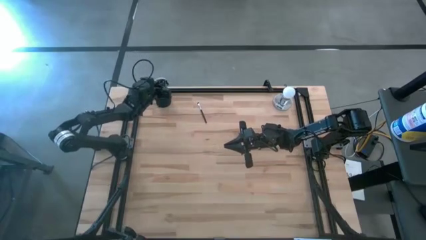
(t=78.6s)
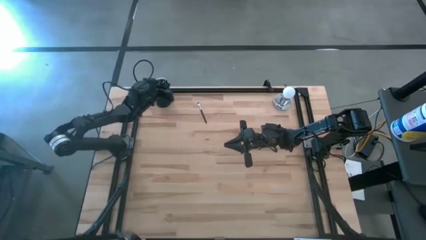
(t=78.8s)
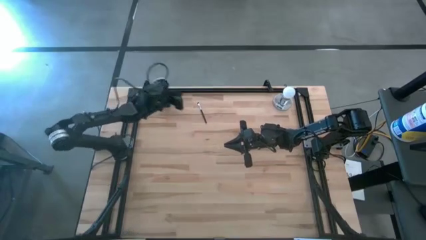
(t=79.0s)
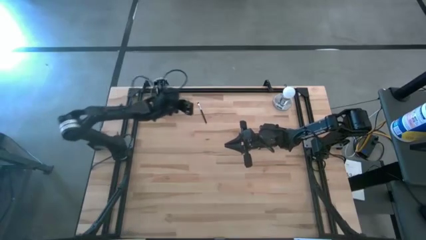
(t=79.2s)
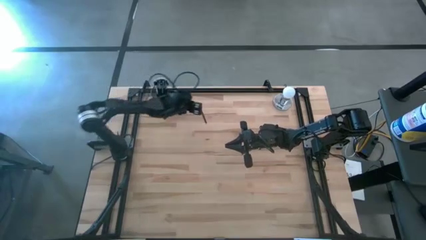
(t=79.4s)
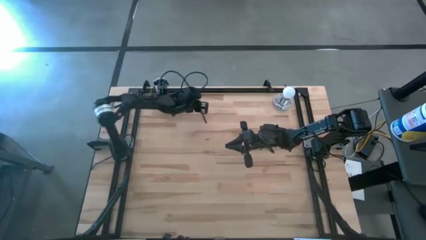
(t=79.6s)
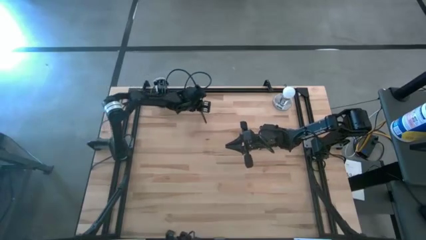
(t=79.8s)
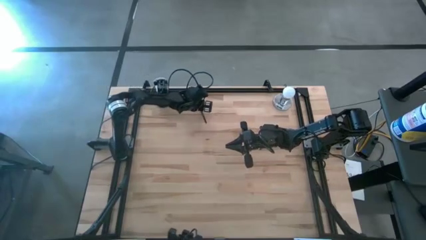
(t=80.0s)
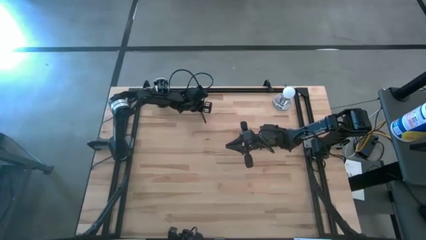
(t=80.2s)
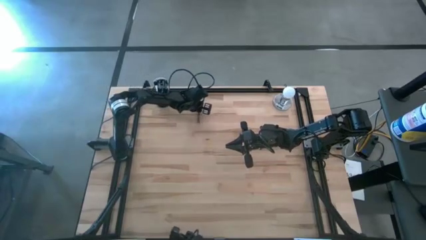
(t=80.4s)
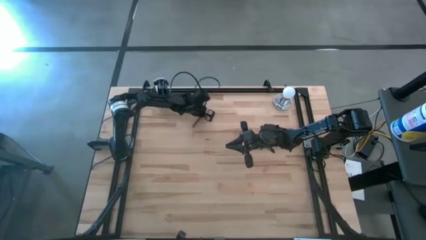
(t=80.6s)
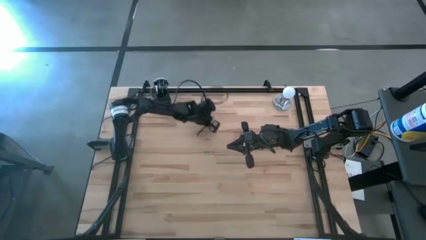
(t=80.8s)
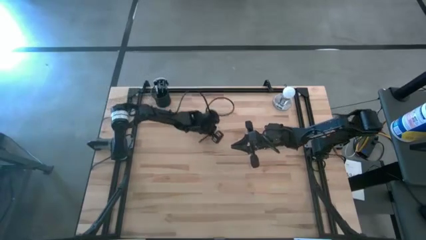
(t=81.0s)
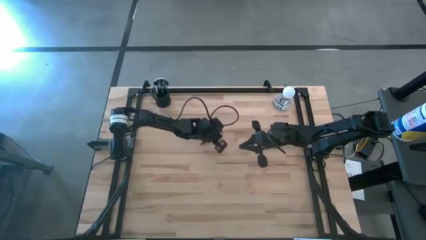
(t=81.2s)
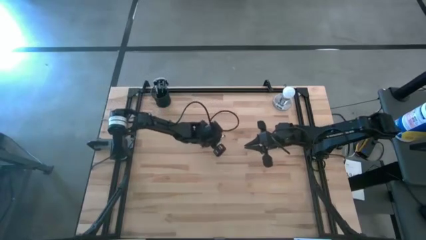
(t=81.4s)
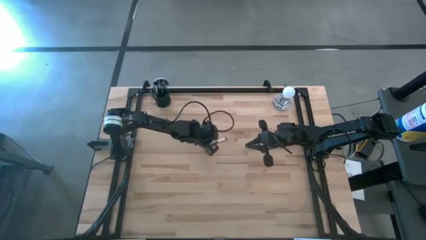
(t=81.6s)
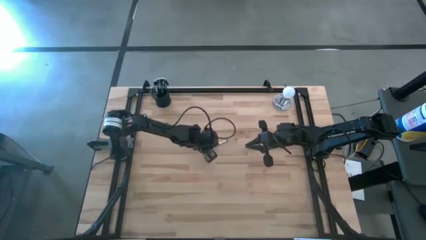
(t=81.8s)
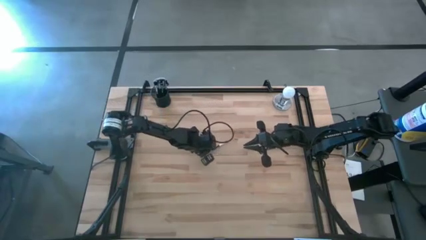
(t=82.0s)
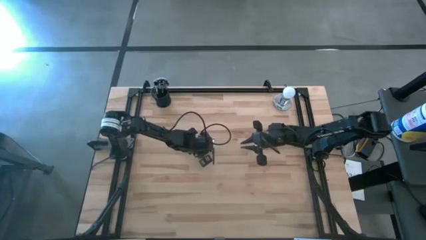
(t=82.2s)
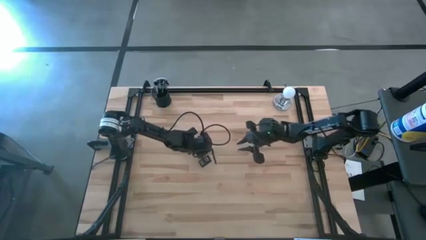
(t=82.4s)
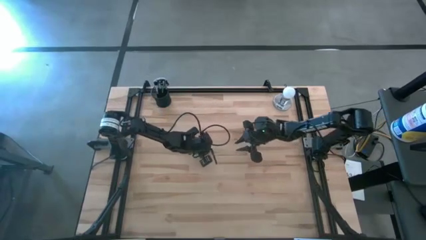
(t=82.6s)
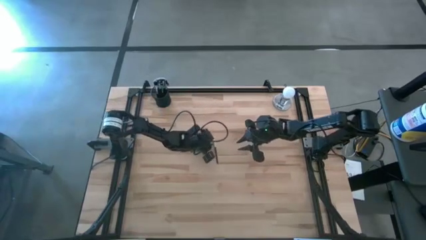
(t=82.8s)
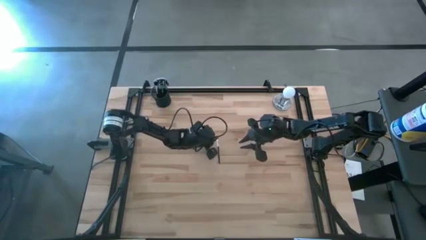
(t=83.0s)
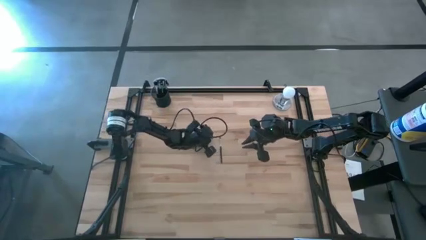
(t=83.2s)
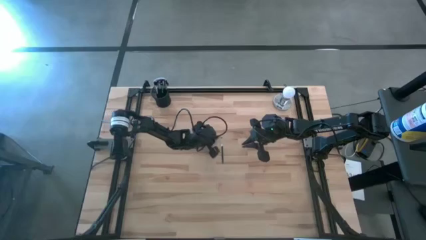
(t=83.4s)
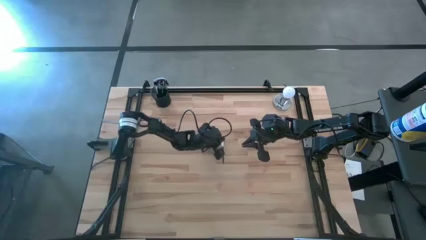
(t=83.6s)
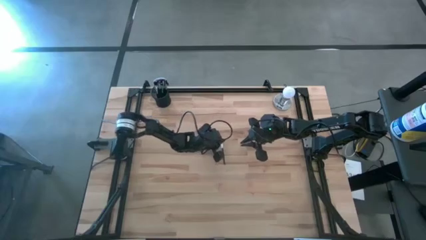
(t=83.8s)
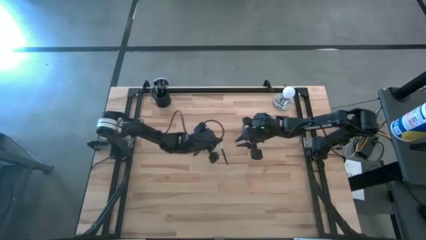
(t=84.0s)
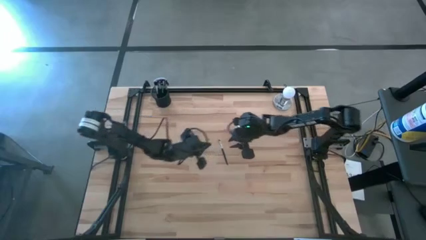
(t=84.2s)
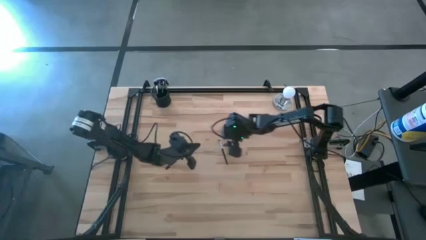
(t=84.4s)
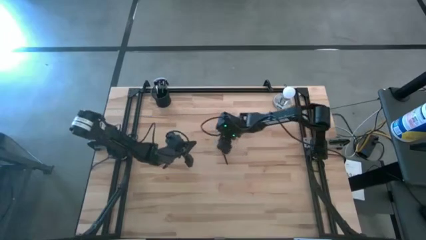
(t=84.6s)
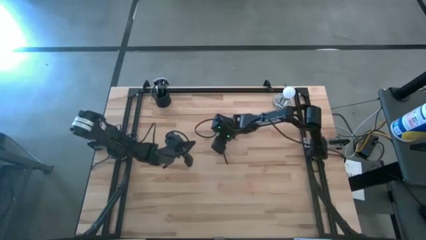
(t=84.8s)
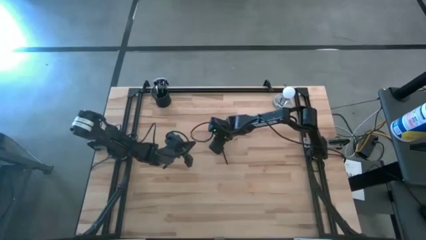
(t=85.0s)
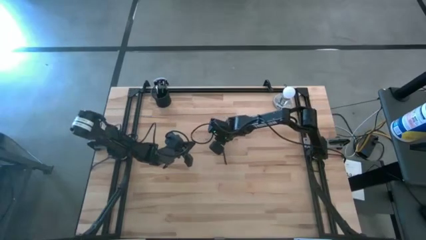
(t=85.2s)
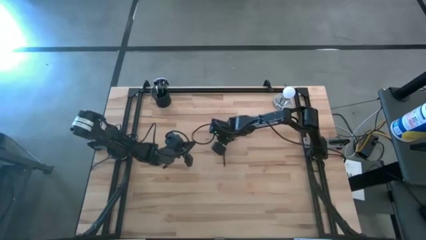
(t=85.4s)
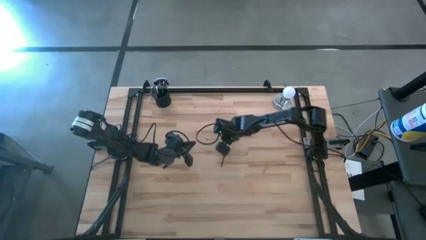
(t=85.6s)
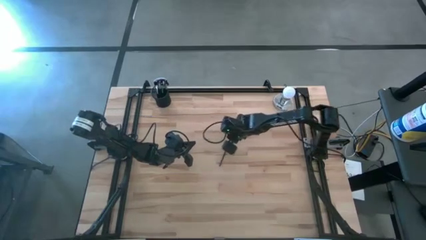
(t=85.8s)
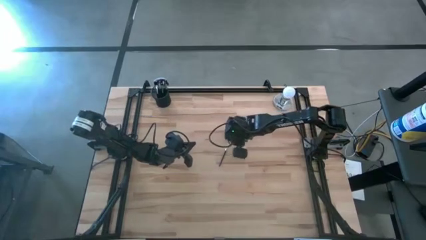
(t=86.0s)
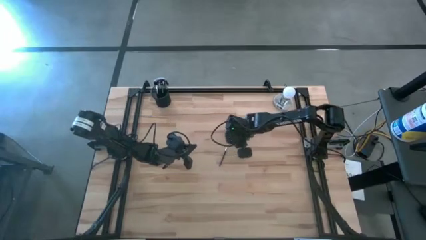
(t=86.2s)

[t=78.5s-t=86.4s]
Task: Put items in baskets/containers
Put the eyeshadow brush into the pen holder

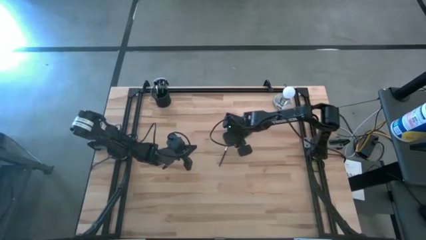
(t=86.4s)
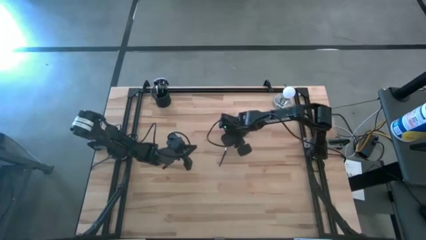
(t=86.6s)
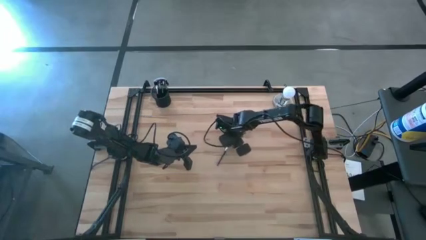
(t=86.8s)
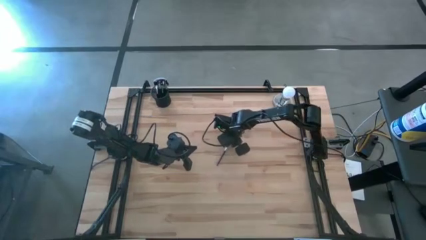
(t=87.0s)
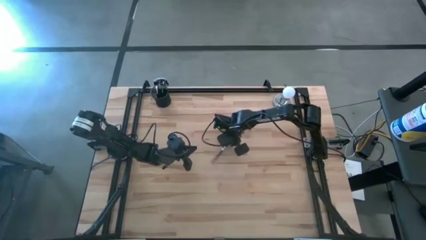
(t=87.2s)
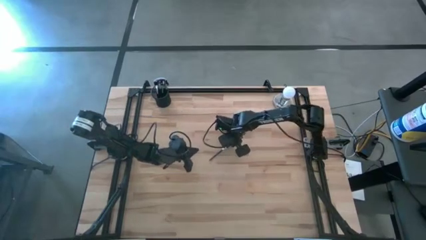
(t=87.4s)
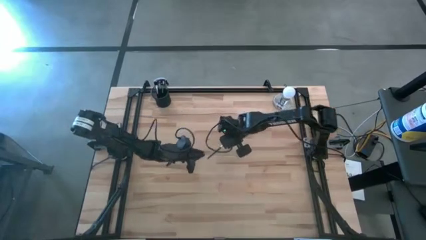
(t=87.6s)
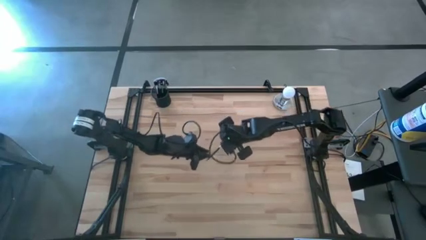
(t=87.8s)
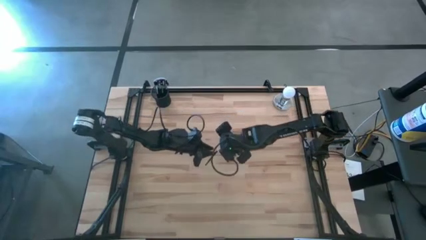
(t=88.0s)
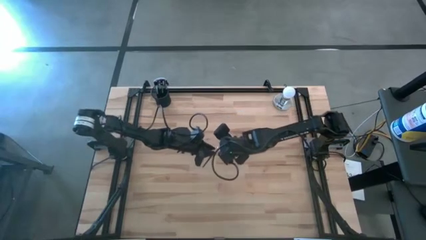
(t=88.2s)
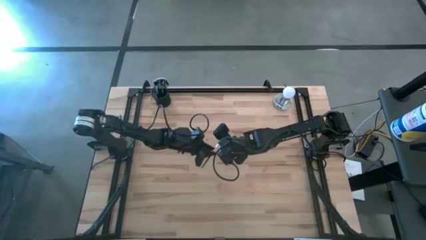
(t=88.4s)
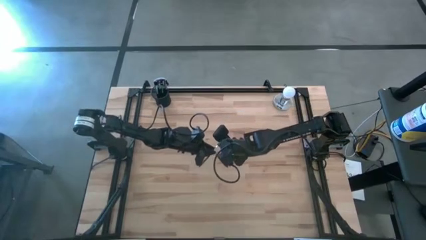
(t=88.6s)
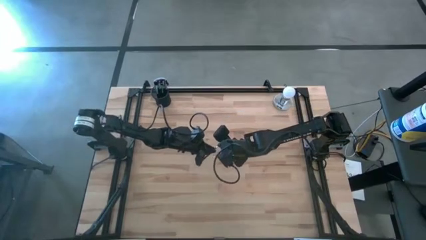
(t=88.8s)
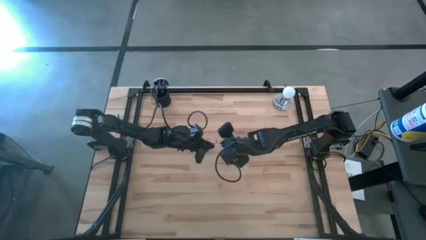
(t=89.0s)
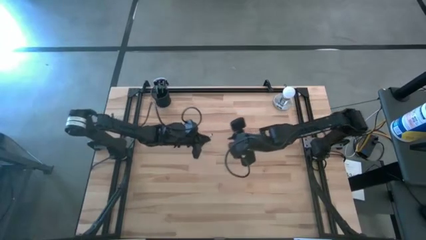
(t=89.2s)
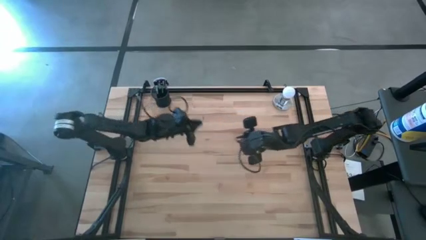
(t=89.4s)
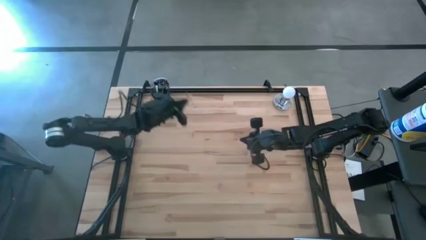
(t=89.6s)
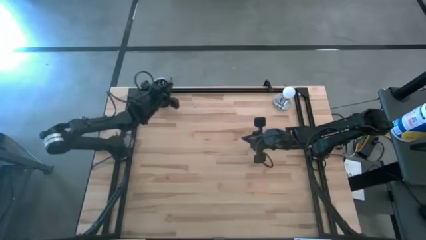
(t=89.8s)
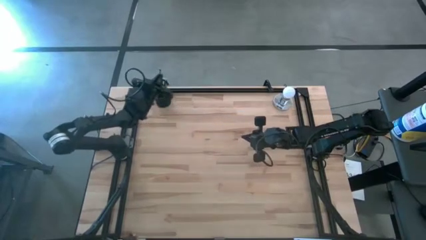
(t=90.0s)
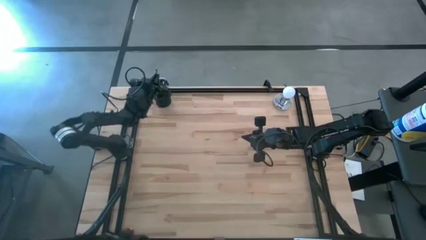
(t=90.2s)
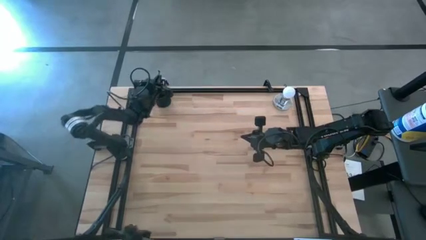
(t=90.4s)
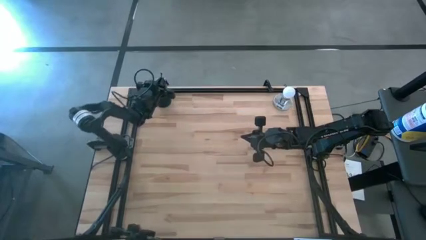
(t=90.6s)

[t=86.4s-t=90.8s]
Put the eyeshadow brush into the pen holder

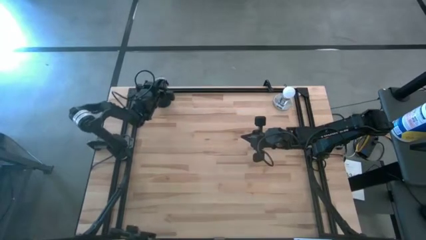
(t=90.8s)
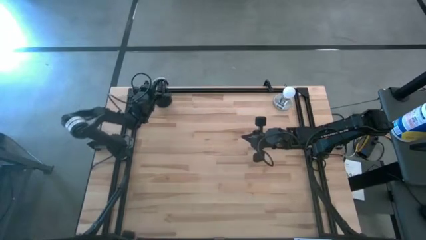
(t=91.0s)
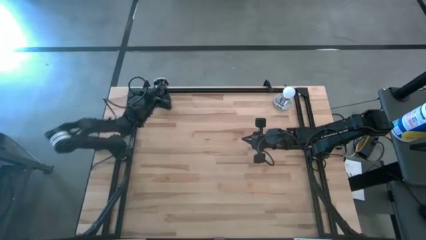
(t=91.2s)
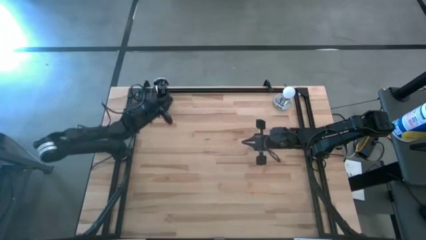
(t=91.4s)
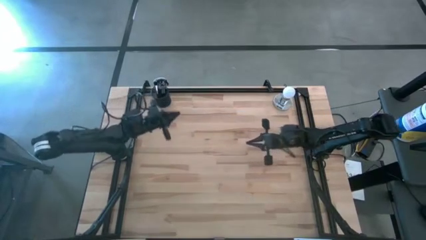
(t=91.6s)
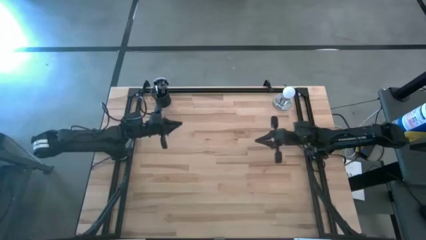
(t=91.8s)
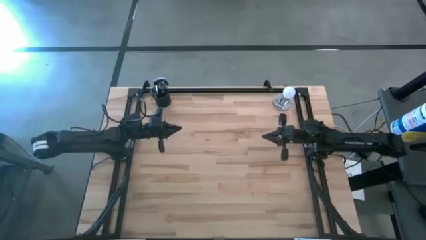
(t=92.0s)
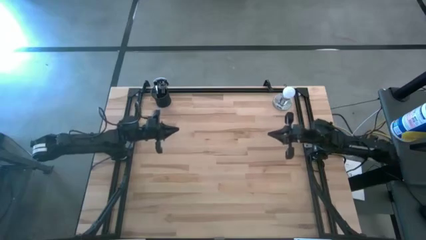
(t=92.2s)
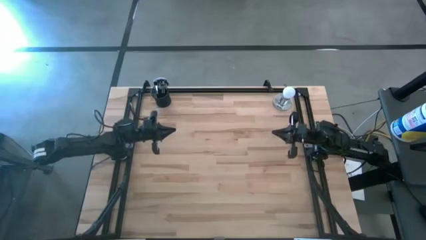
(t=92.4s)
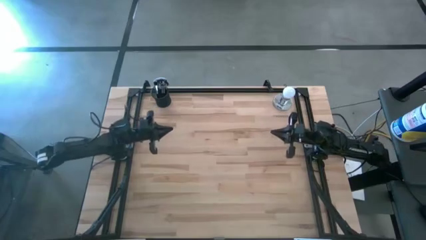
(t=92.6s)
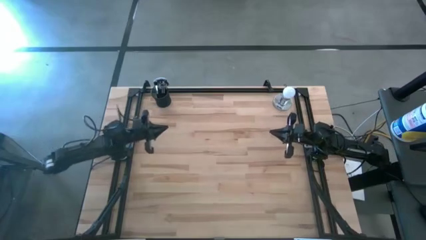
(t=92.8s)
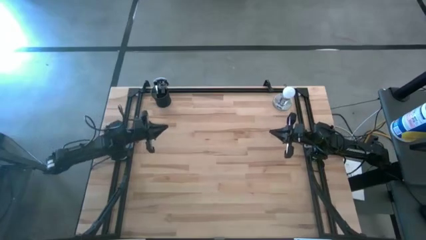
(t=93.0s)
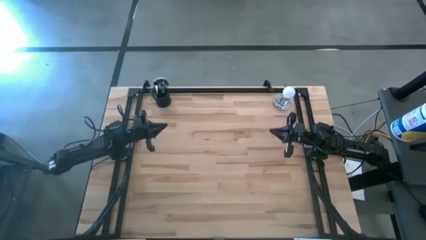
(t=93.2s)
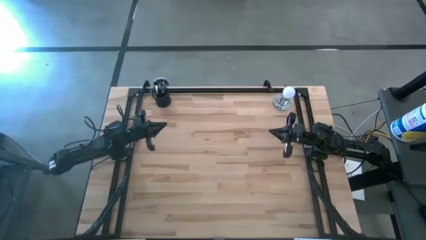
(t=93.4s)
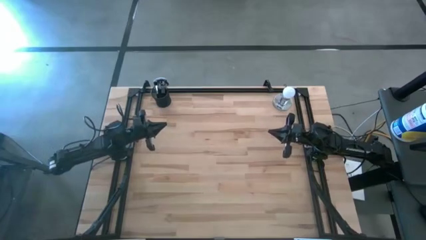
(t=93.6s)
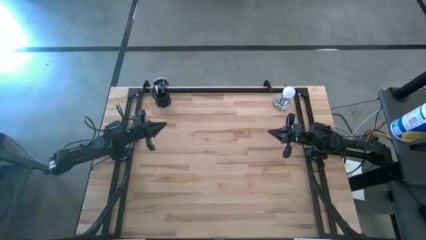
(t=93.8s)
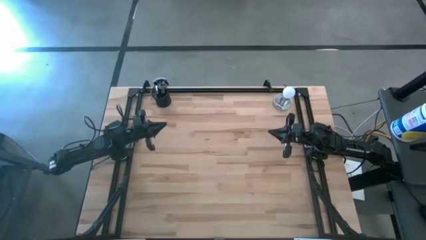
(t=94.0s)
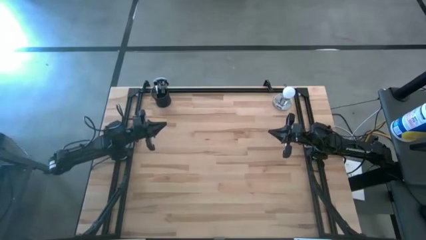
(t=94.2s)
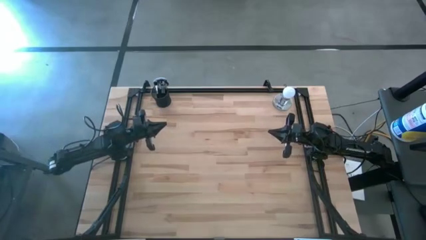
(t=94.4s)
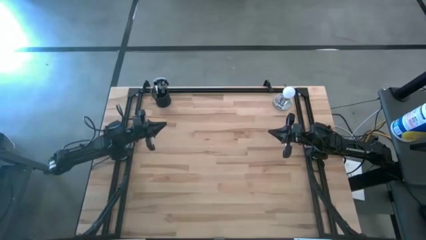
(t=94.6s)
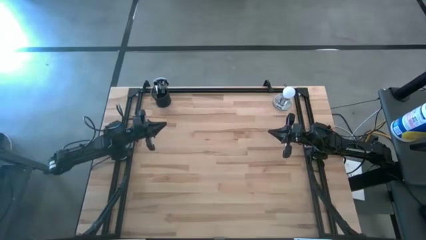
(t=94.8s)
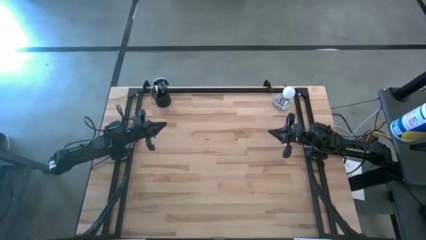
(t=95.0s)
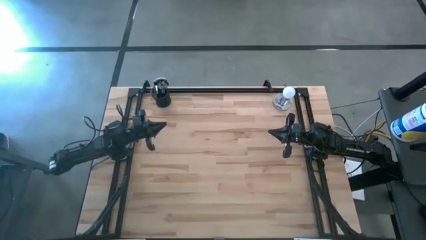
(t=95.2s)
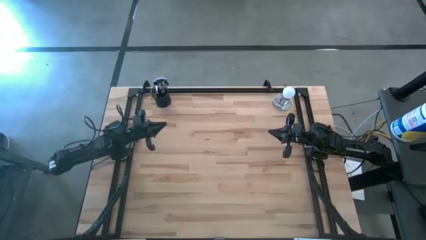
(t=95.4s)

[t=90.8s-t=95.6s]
Return to Home Position
